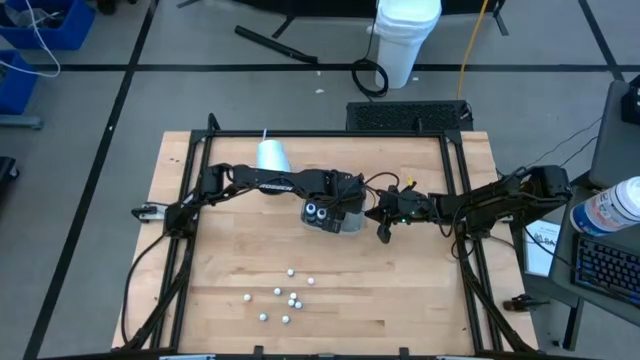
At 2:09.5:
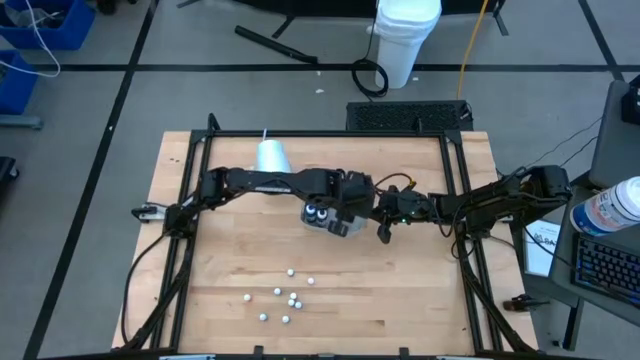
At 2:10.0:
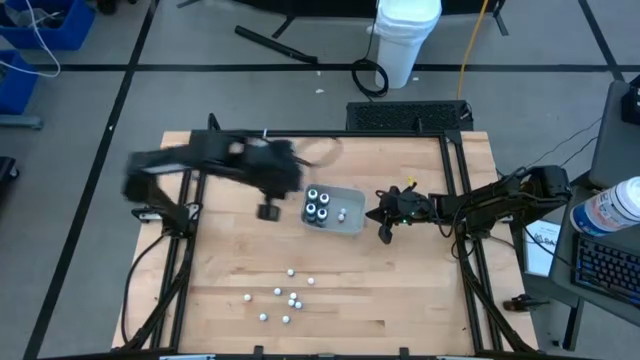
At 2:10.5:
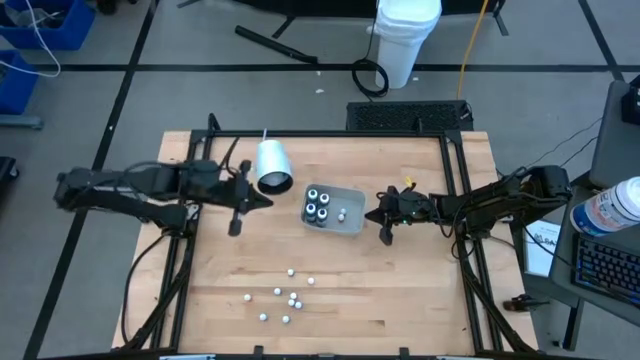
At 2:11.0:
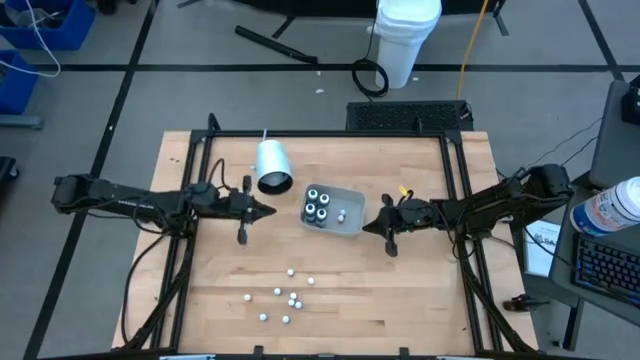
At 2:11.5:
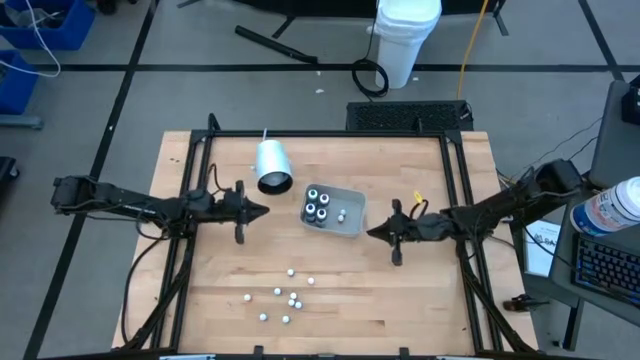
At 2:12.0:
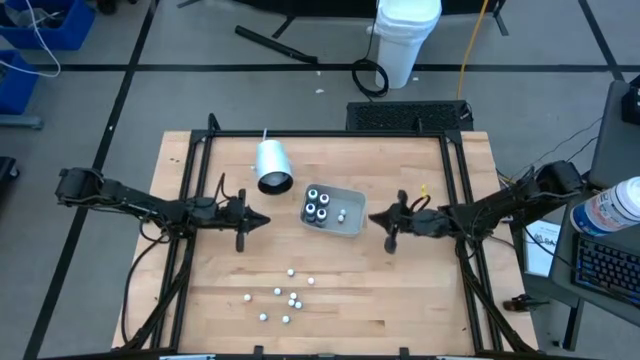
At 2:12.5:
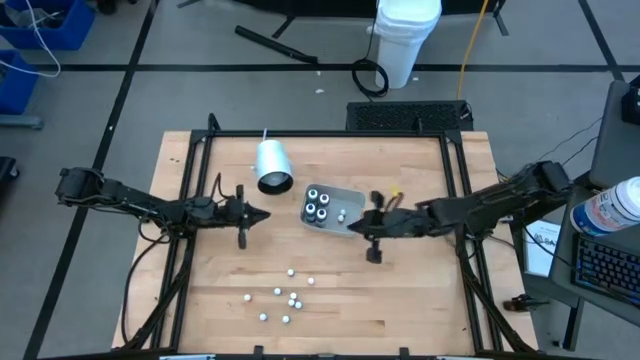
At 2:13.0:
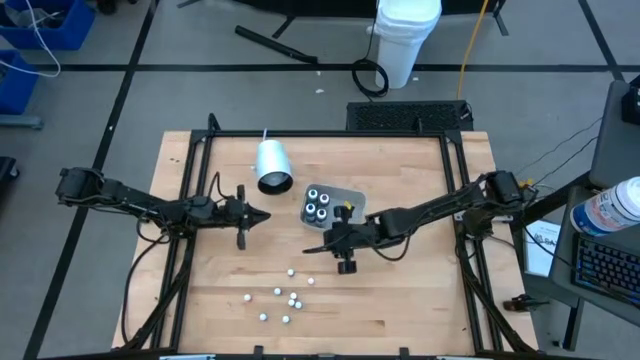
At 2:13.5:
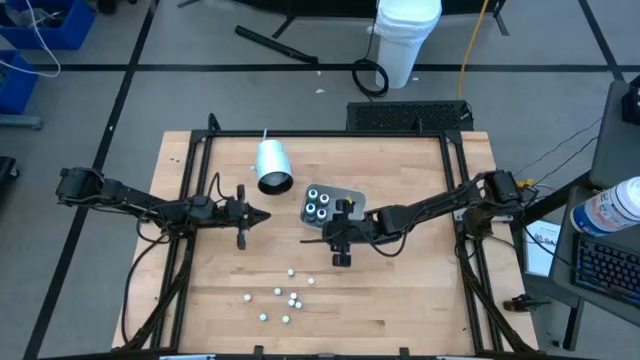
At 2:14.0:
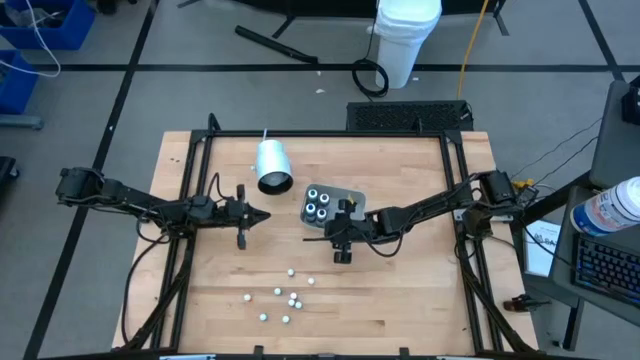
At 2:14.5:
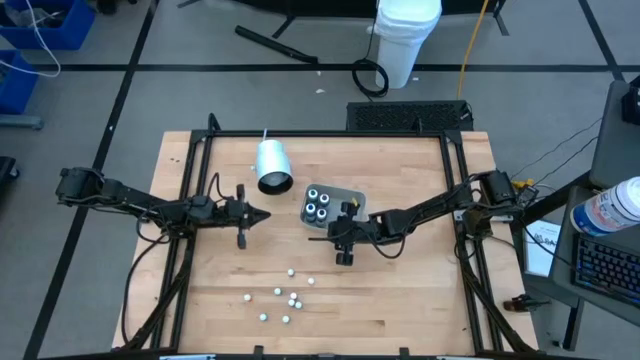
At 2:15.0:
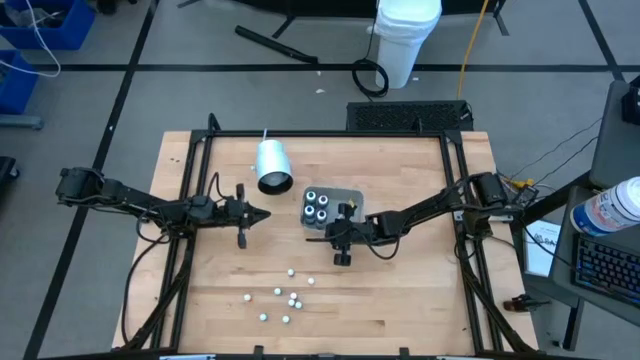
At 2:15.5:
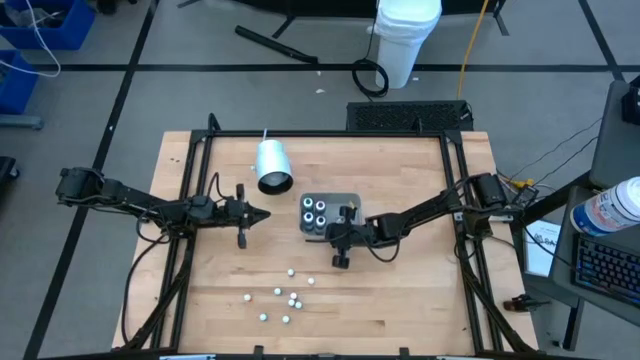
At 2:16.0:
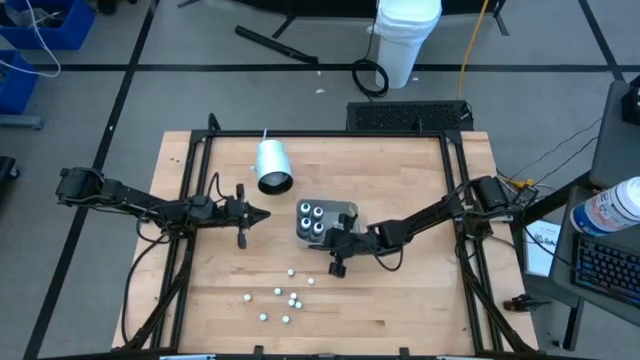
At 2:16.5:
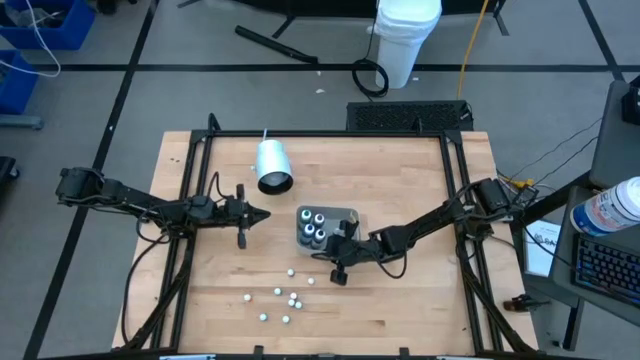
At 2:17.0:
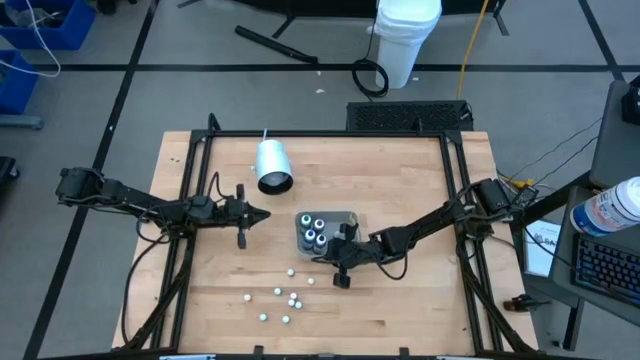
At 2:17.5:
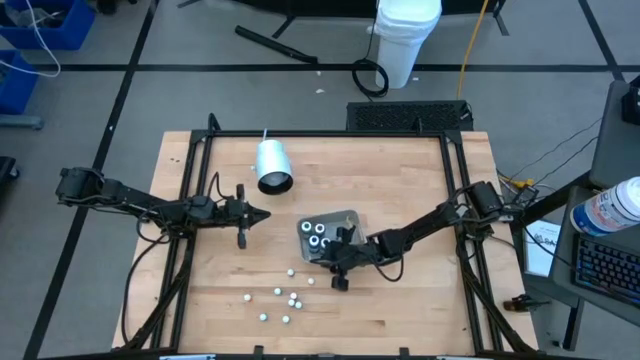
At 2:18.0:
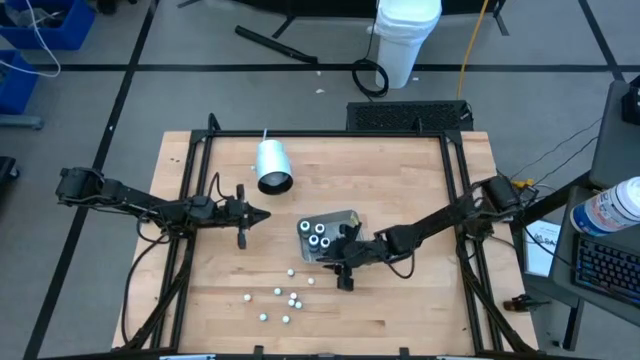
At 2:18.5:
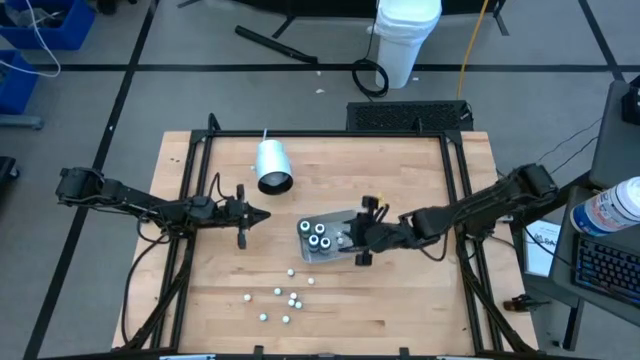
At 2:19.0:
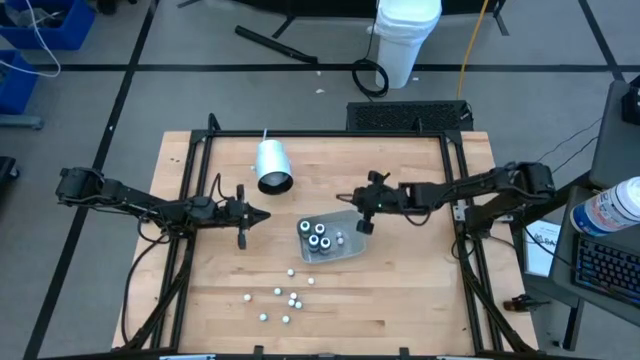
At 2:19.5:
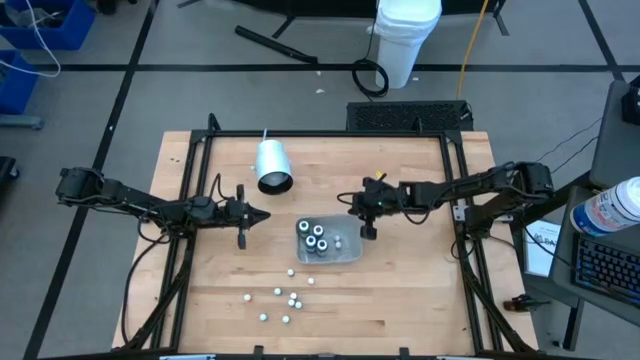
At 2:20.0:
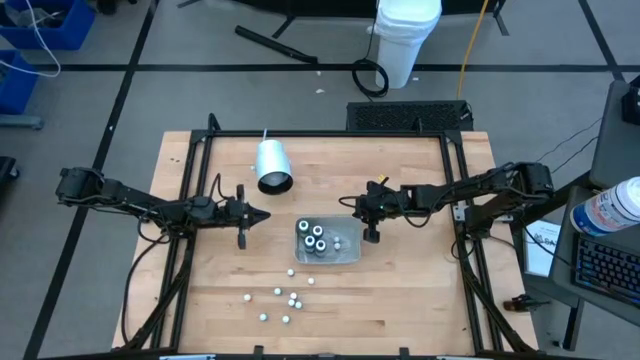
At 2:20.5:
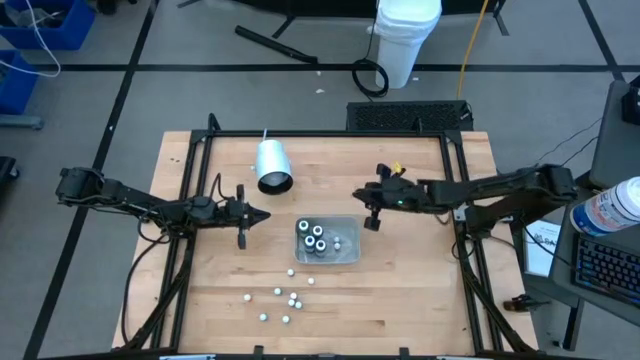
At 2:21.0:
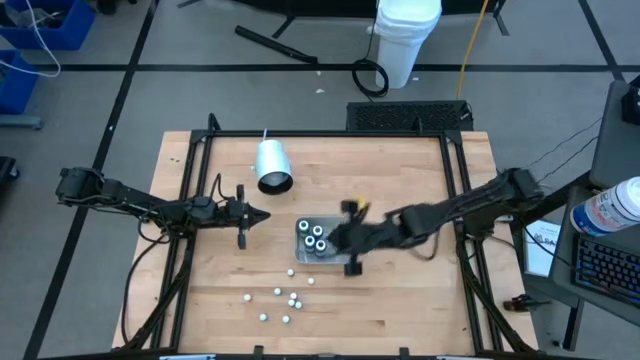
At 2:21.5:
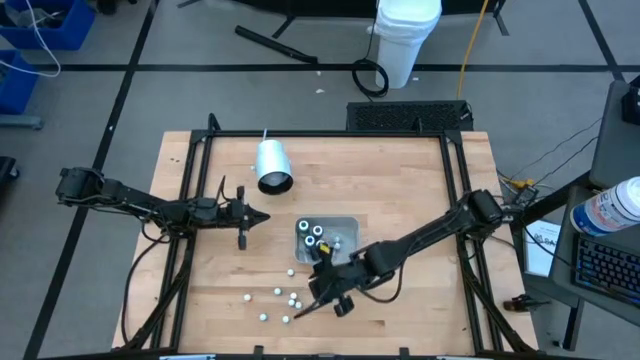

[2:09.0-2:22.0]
Task: Pick & Place food coloring
Move the gray bin to the center of the table

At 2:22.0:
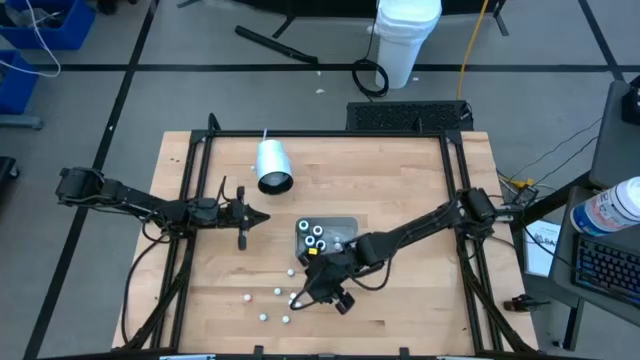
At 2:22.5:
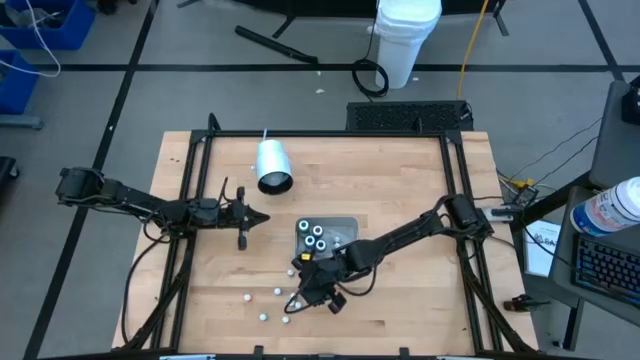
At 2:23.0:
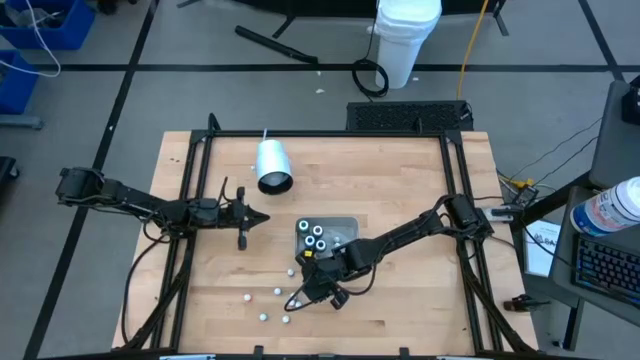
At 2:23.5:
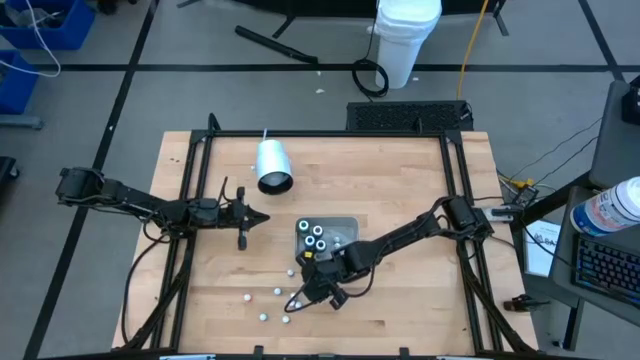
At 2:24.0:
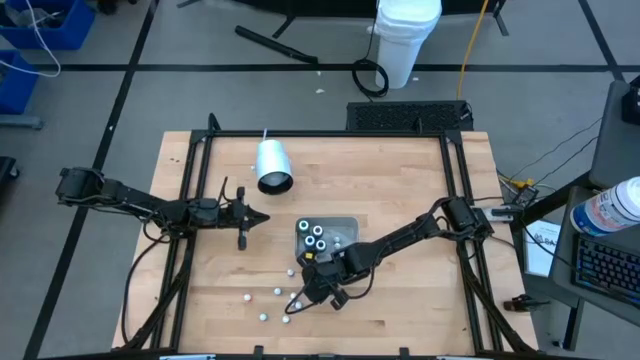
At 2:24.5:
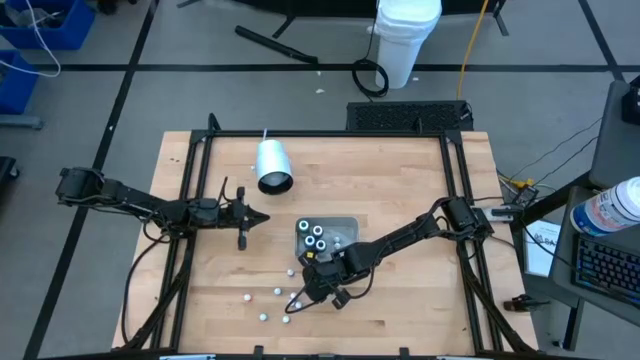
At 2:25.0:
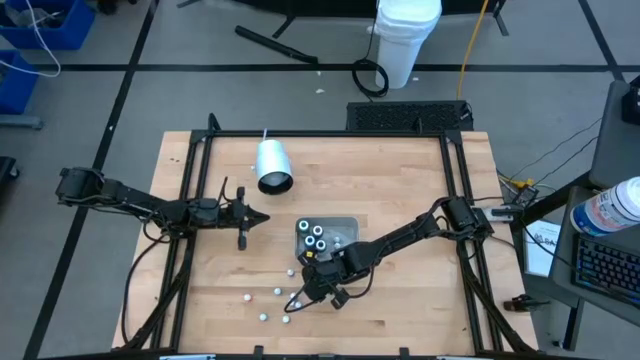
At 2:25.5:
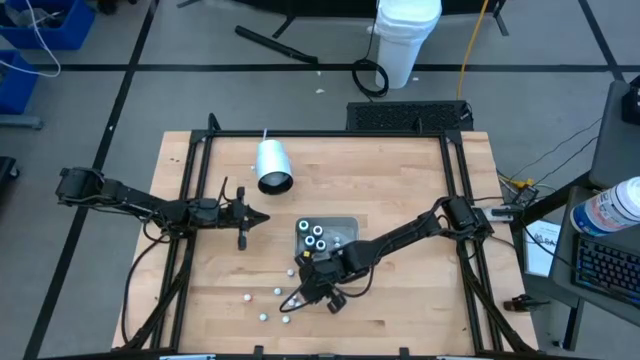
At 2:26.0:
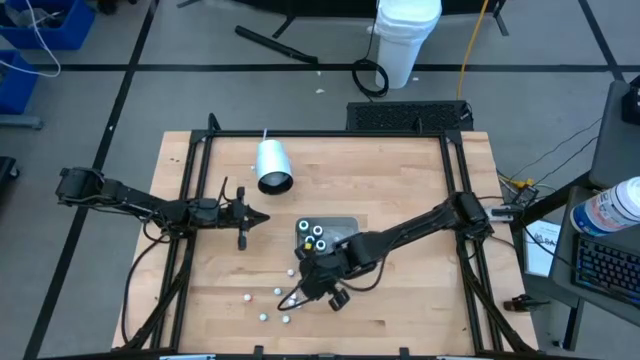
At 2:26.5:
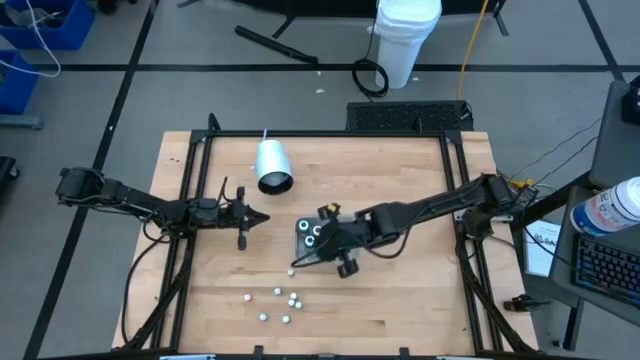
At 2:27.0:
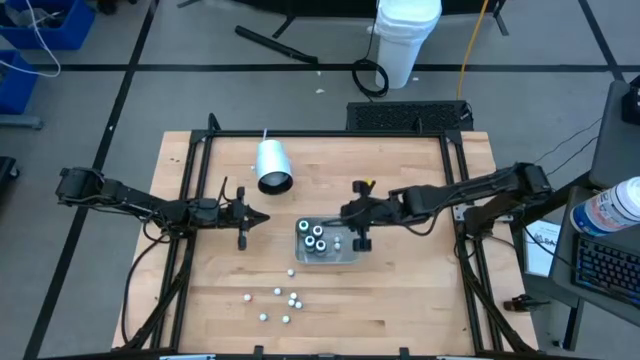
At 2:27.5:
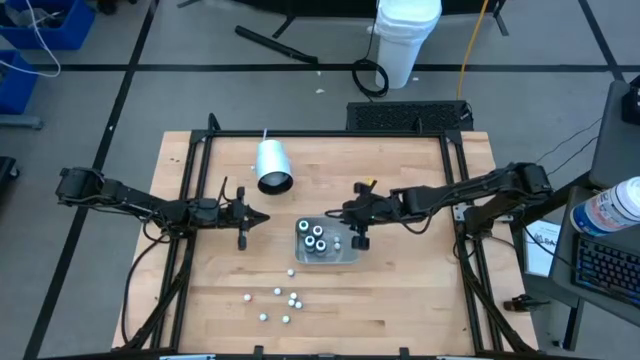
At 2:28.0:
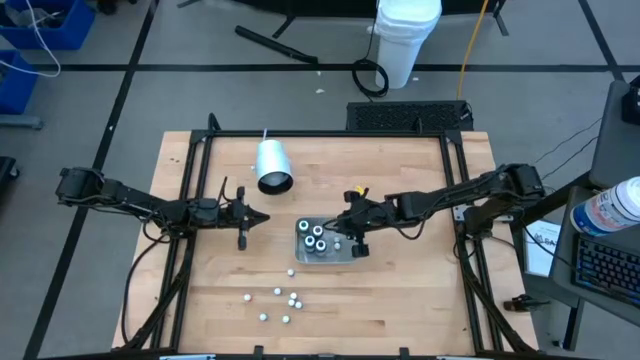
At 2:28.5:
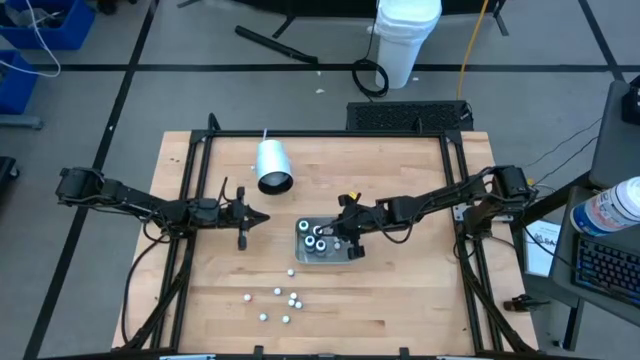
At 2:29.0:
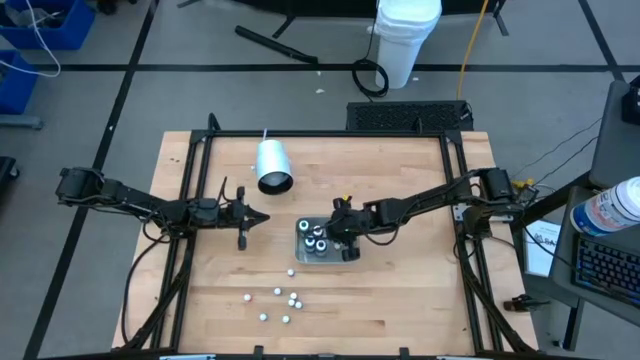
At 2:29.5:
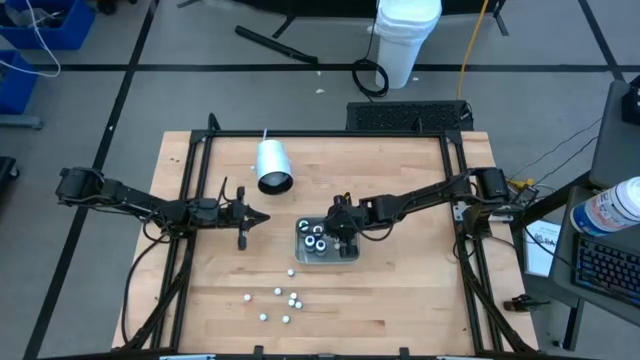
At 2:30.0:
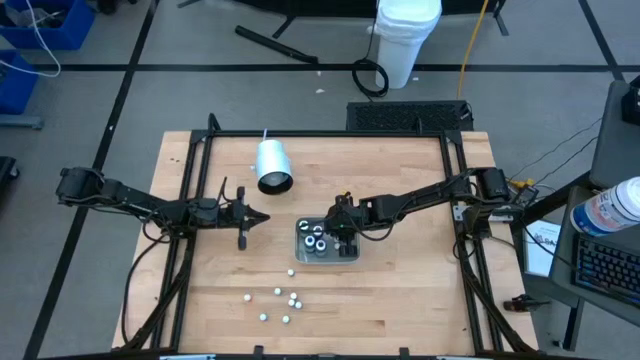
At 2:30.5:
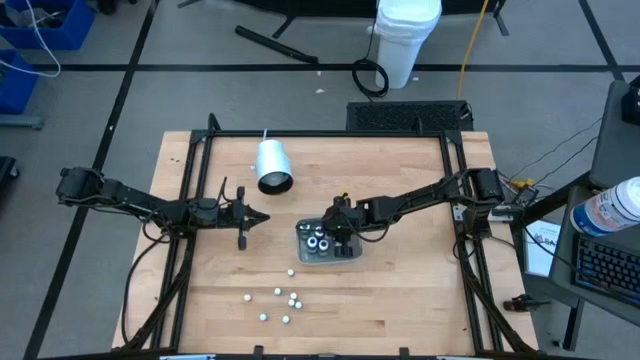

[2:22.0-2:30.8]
Put the orange food coloring bottle into the gray bin
